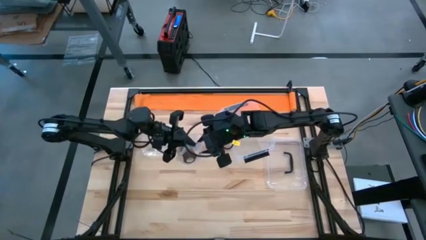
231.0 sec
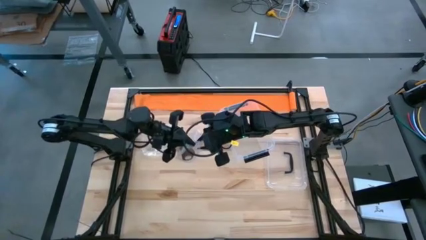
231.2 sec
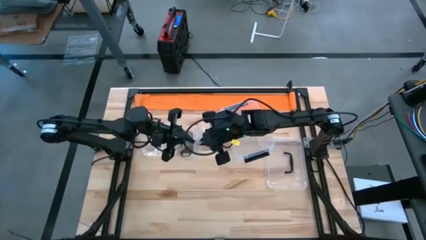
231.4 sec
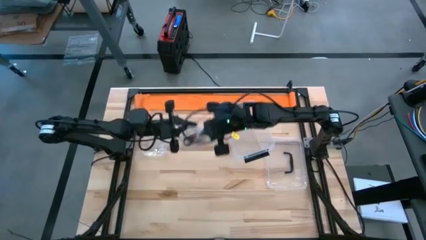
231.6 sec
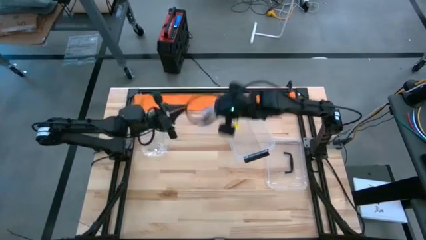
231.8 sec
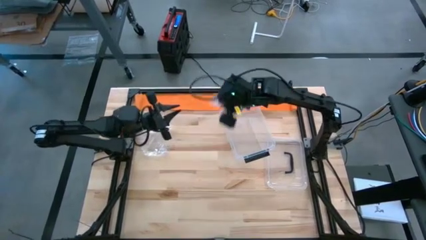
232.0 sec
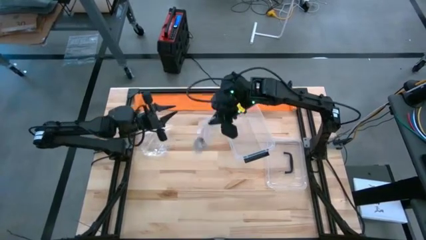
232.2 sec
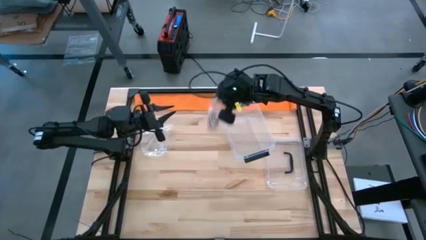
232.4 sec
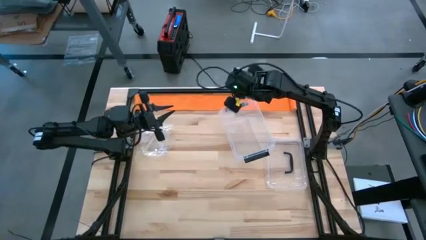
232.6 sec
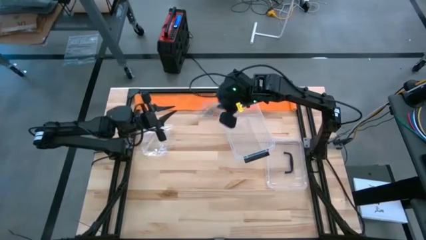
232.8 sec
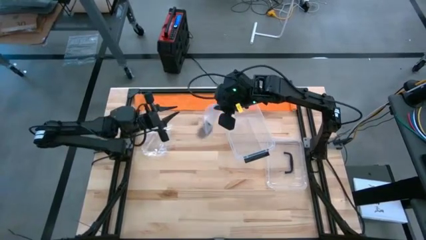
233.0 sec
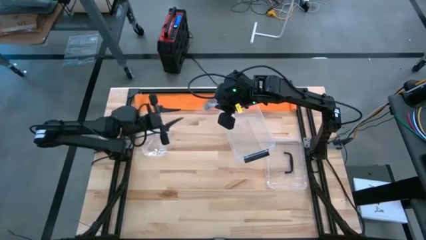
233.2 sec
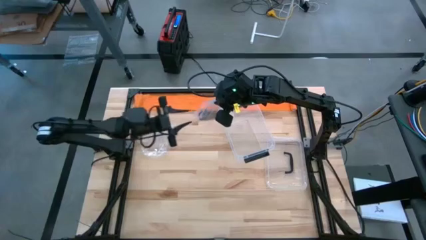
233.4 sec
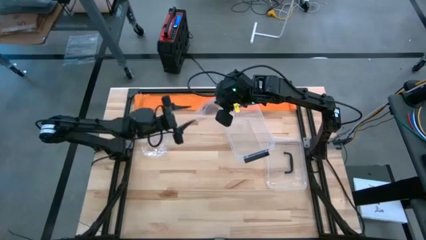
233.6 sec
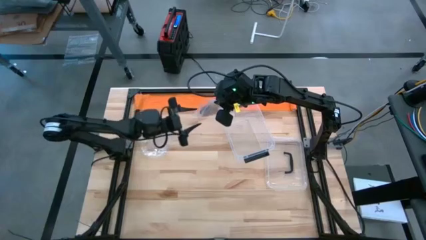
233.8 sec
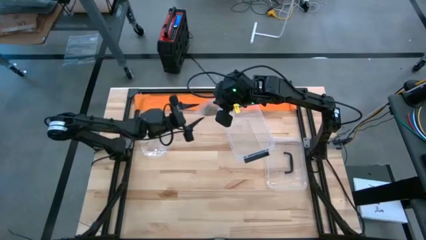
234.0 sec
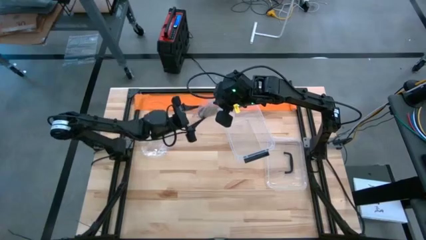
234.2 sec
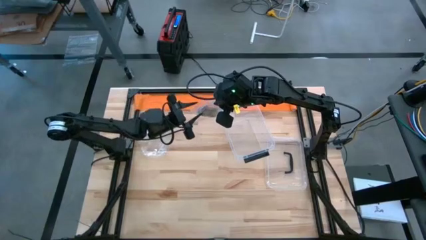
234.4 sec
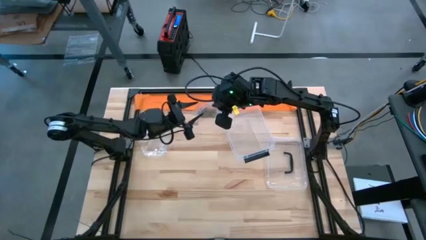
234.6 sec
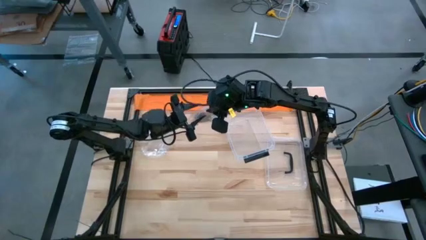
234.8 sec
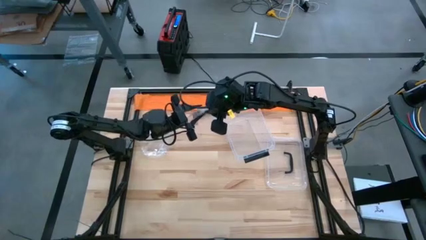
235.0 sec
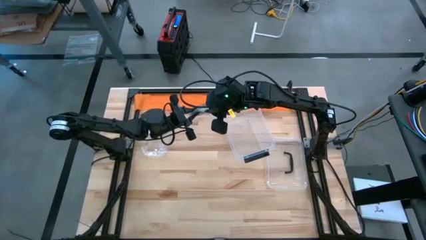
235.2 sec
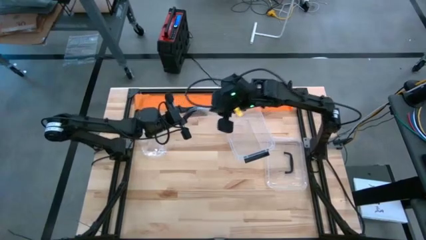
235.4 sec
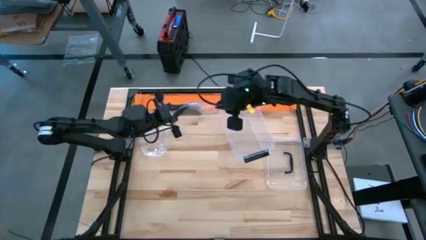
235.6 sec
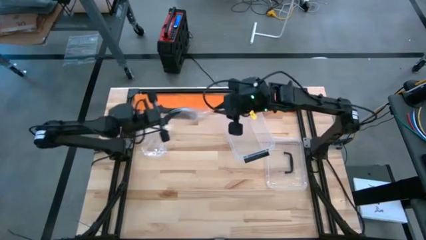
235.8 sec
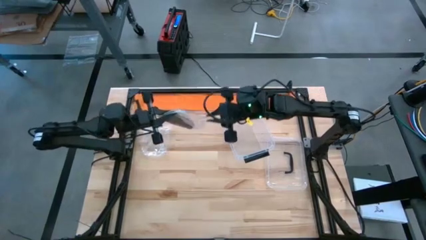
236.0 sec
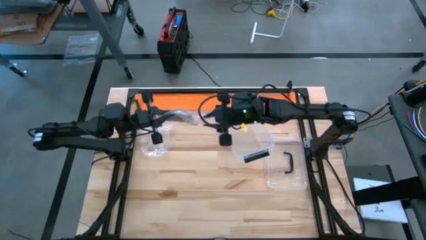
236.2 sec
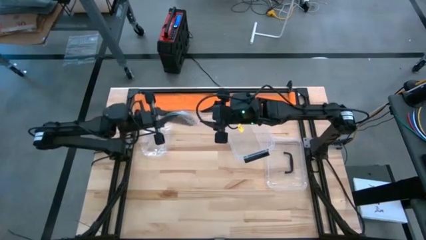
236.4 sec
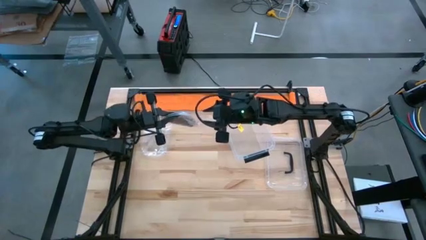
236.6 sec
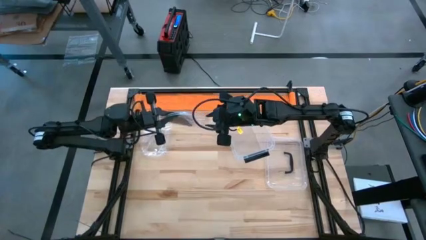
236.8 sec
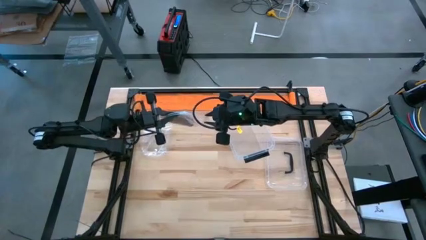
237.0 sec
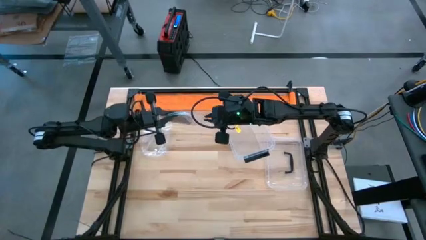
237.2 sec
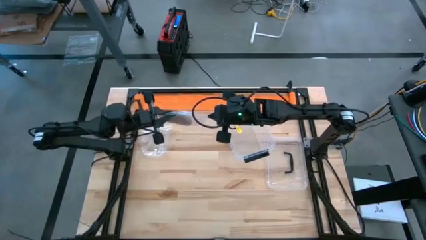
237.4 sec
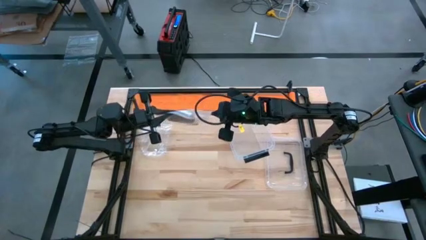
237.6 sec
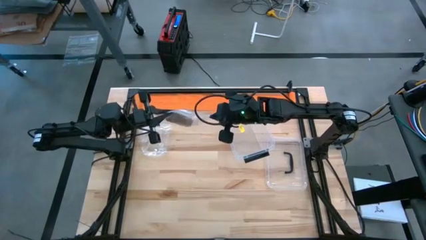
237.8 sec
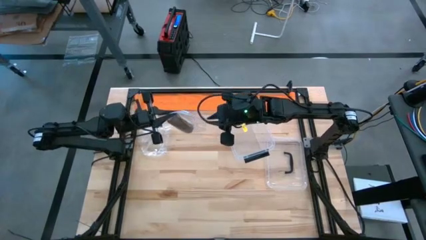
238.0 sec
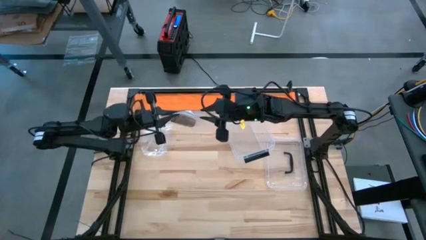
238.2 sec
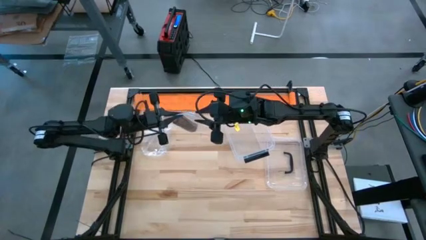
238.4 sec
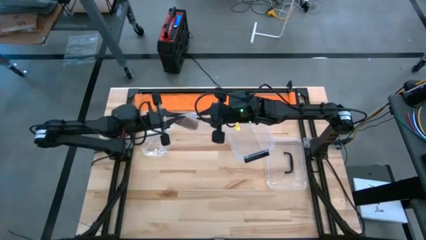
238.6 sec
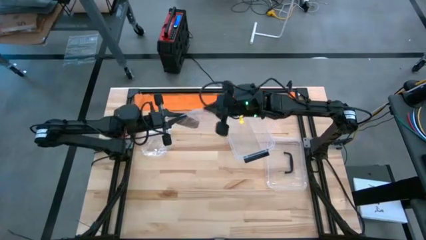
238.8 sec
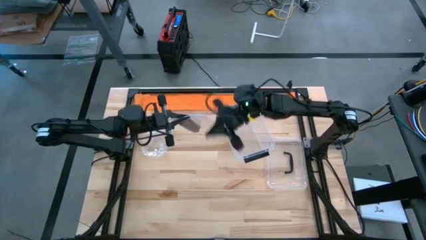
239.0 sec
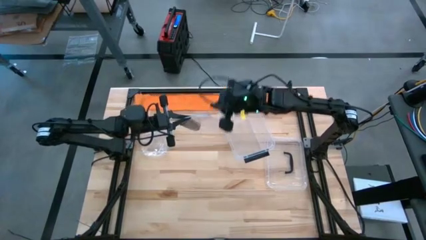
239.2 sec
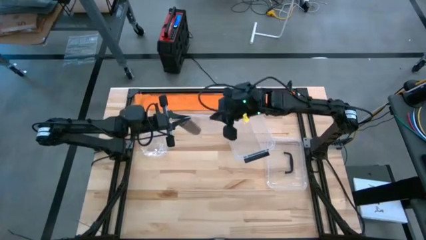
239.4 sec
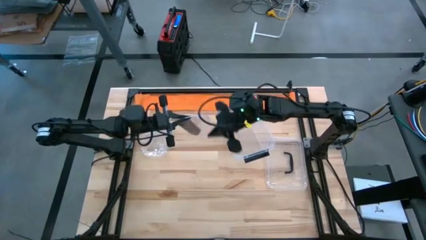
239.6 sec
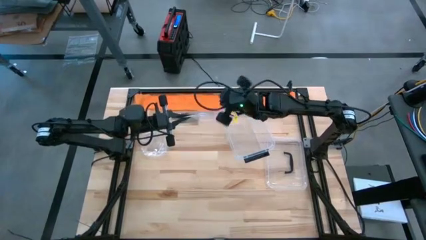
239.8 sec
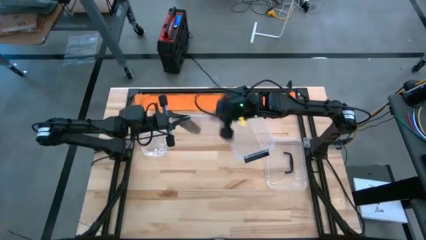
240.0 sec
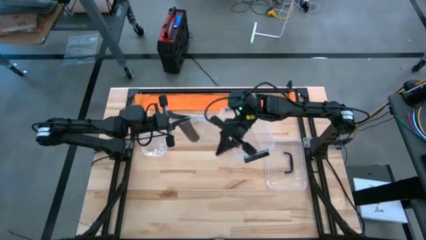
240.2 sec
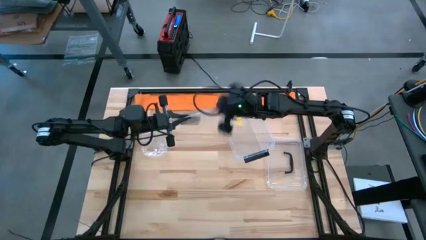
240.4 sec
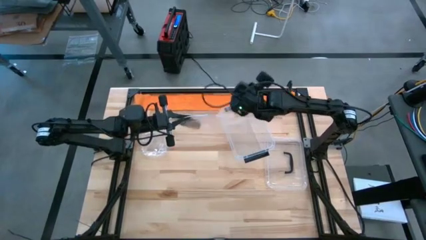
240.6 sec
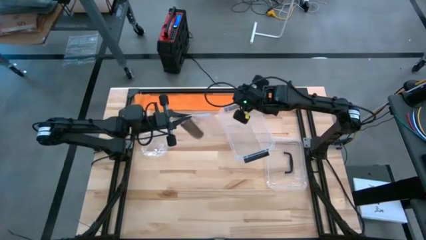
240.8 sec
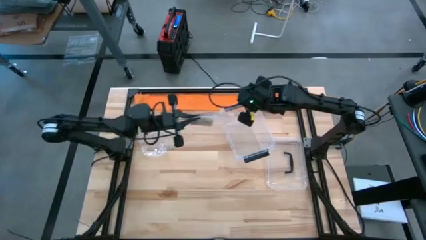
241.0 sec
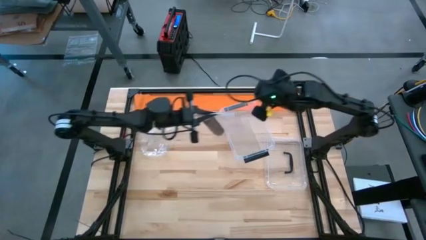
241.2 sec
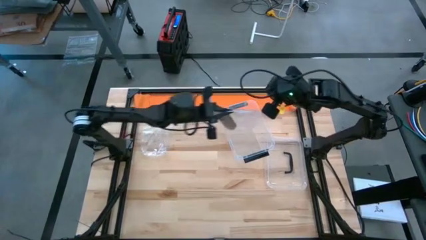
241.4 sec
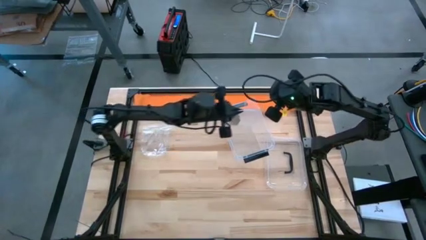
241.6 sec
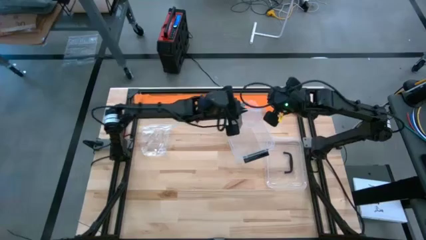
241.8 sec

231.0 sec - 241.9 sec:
Task: Roll bandage
Put the rolled brown bandage into the transparent zip bag

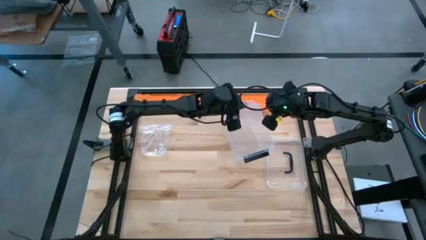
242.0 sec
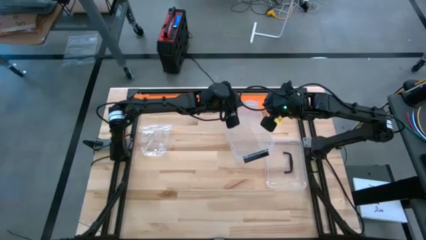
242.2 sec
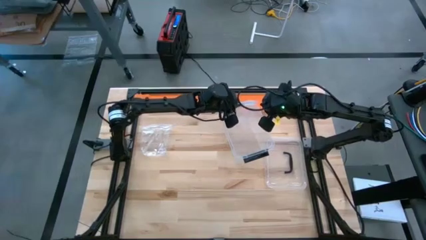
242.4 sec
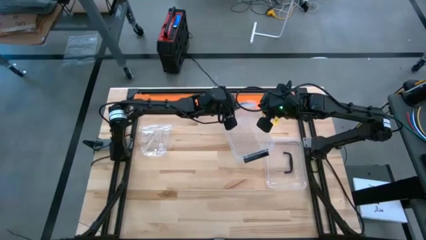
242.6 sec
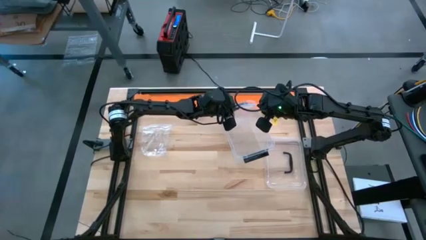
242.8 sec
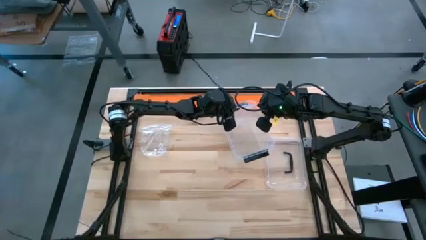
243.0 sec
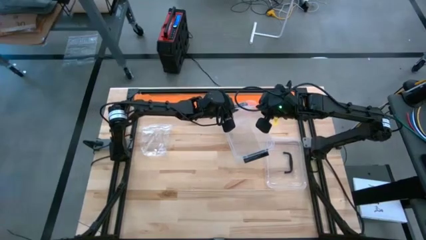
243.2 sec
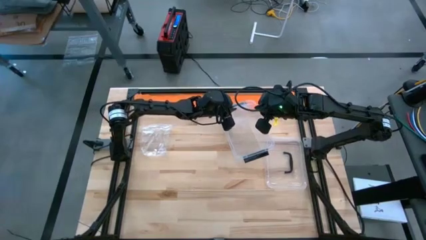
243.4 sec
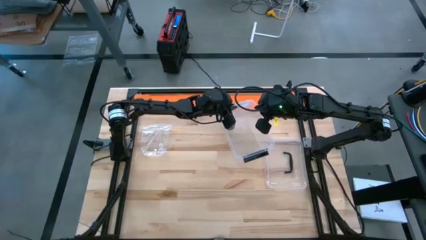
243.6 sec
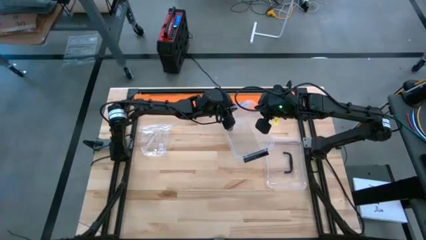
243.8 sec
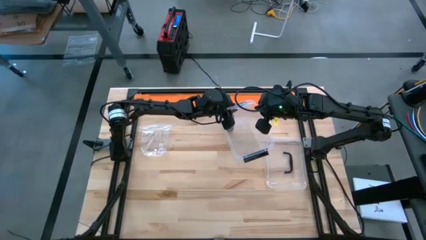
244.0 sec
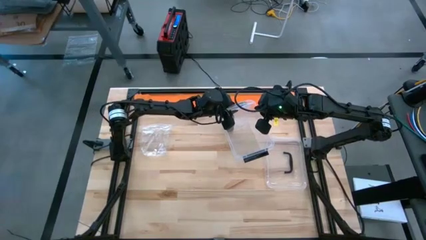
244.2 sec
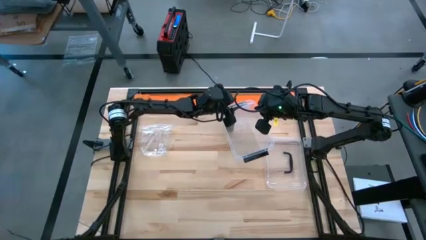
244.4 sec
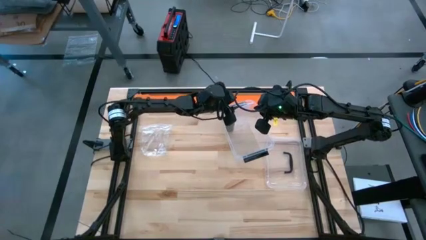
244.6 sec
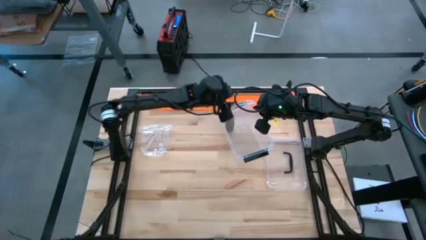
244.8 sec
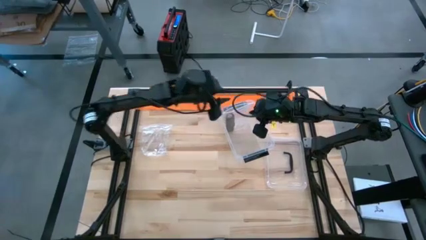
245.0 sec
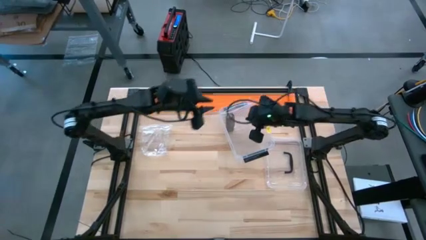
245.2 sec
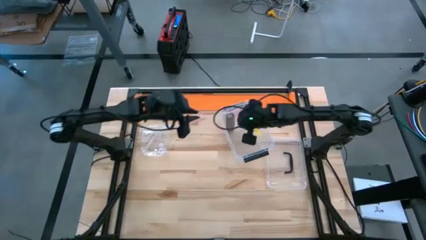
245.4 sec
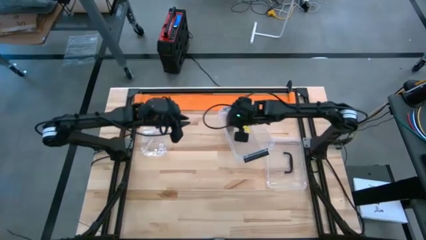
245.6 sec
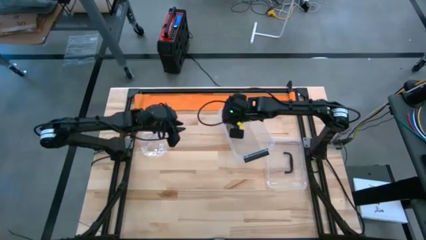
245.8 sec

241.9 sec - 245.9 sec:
Put the transparent zip bag into the transparent container
